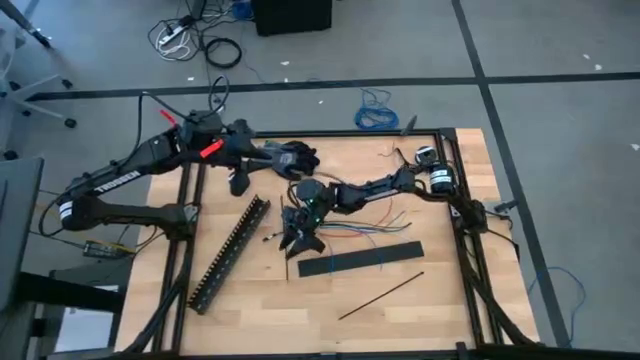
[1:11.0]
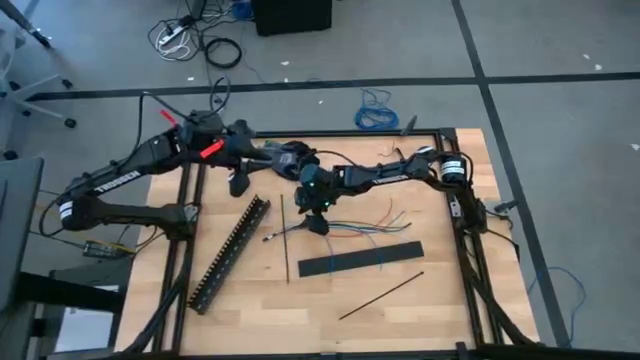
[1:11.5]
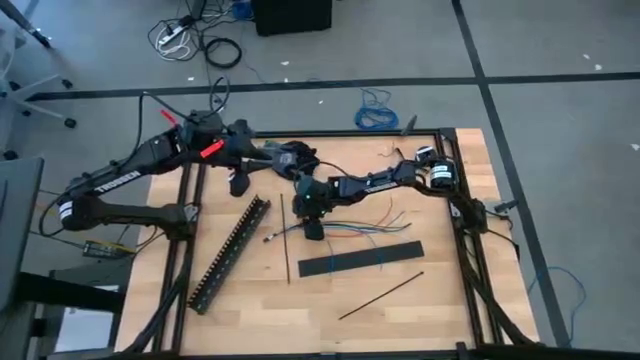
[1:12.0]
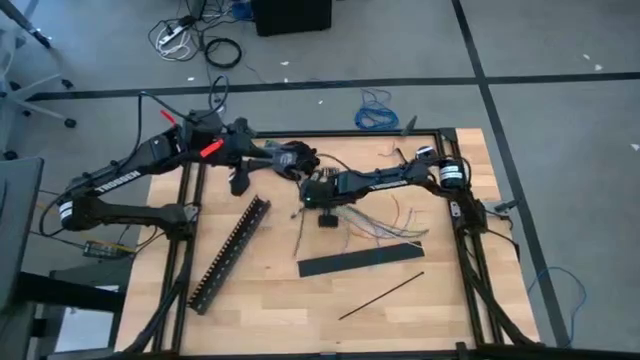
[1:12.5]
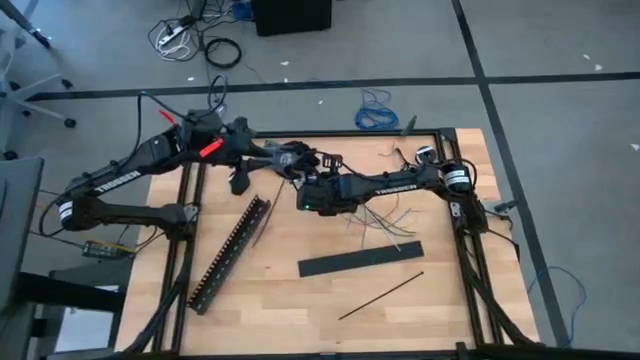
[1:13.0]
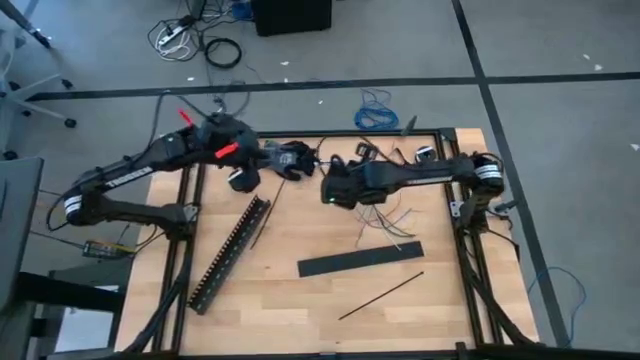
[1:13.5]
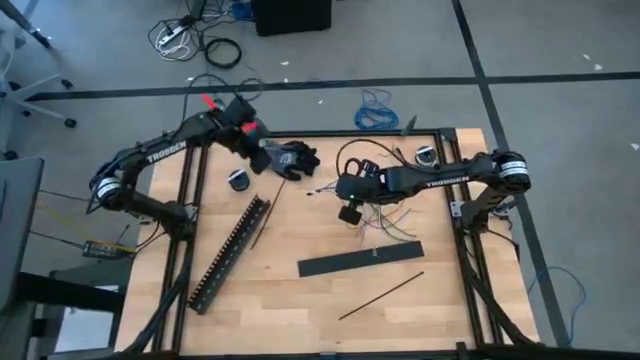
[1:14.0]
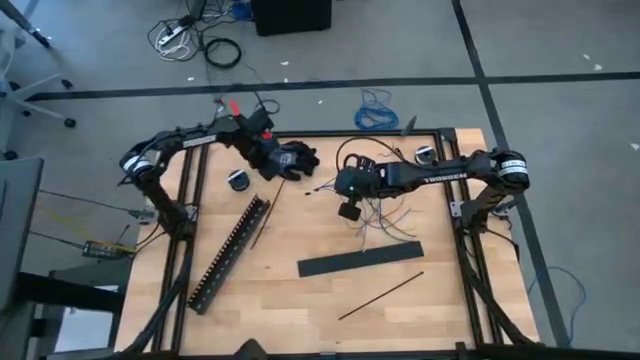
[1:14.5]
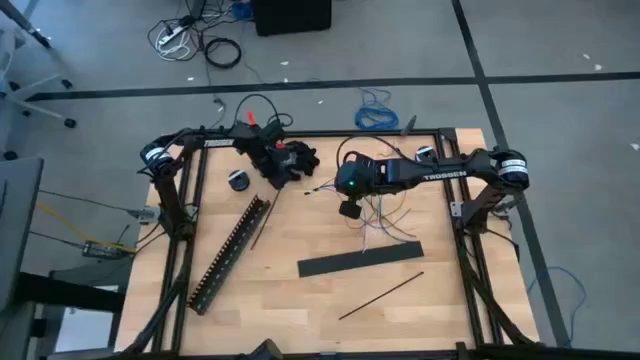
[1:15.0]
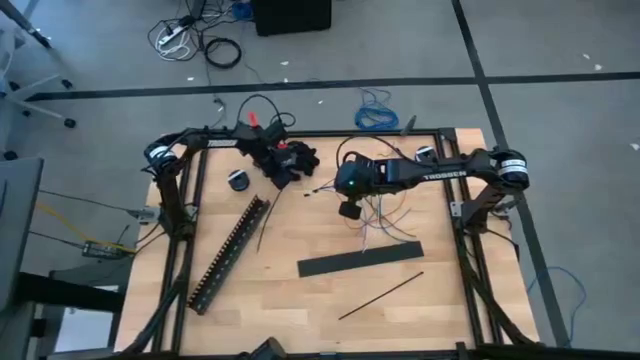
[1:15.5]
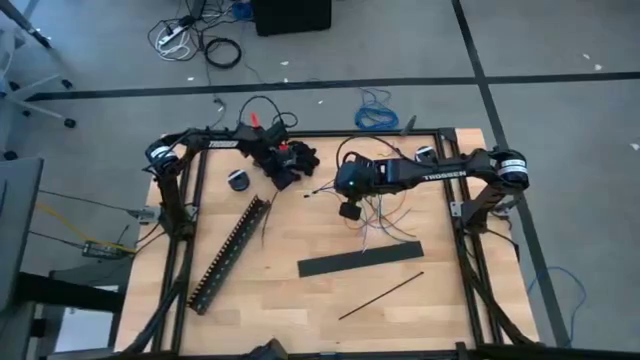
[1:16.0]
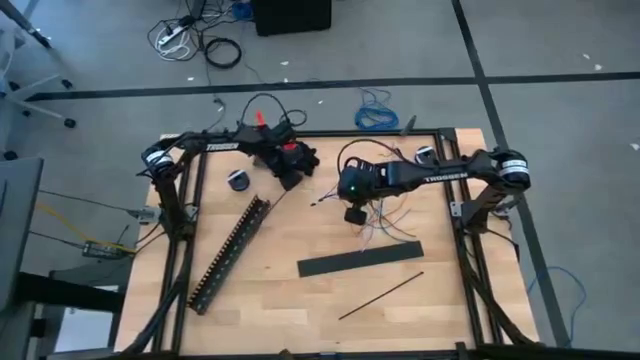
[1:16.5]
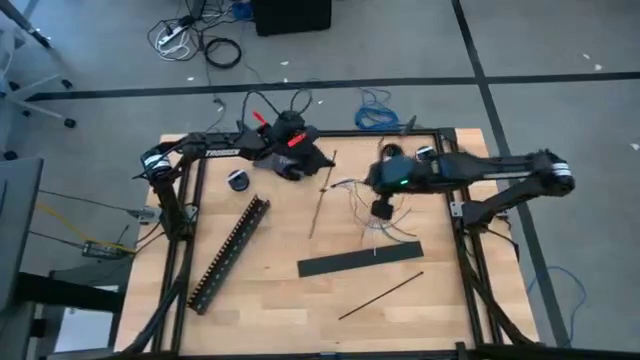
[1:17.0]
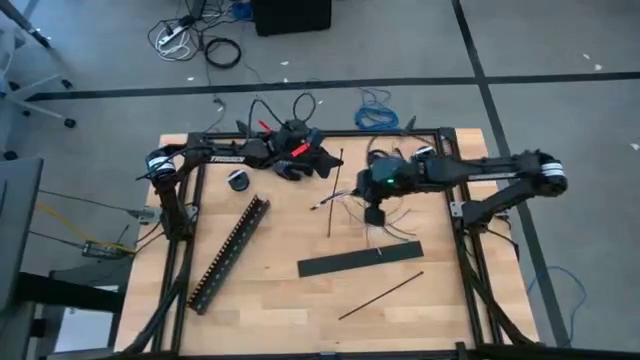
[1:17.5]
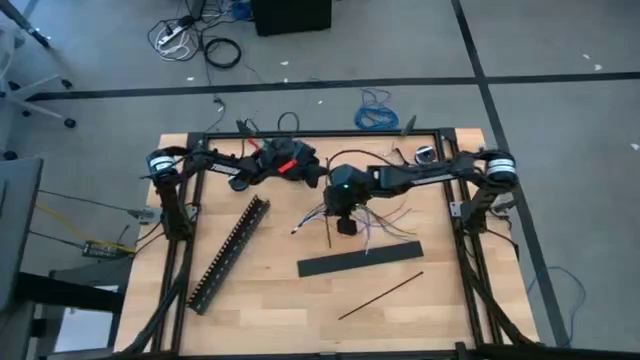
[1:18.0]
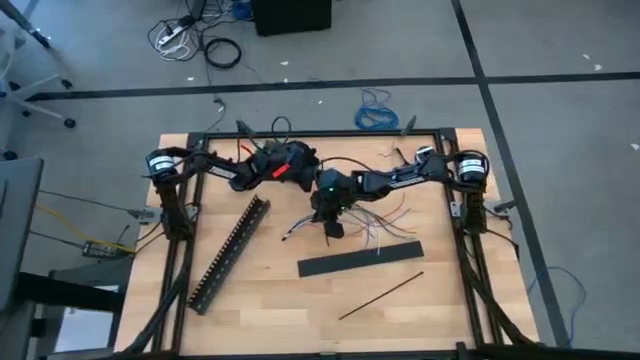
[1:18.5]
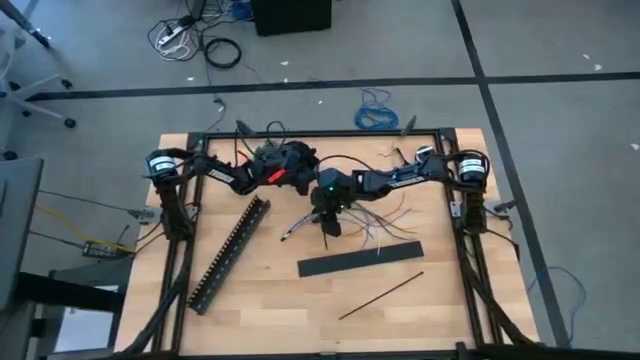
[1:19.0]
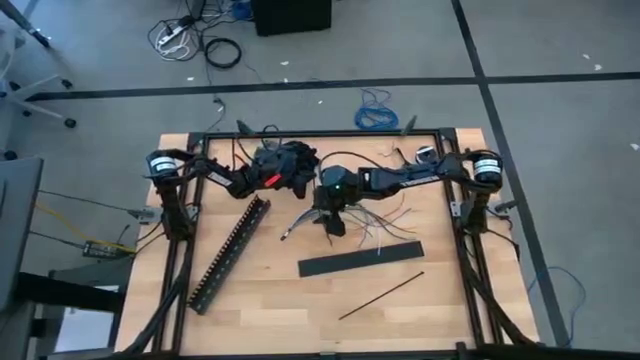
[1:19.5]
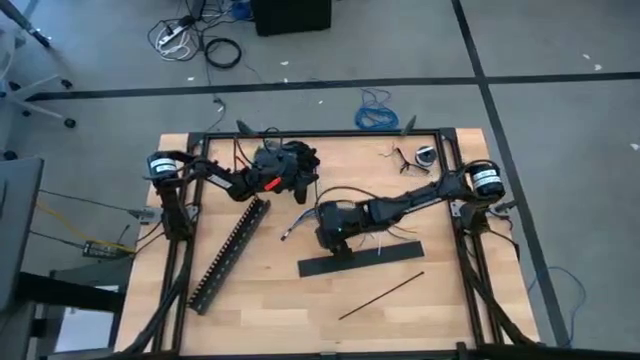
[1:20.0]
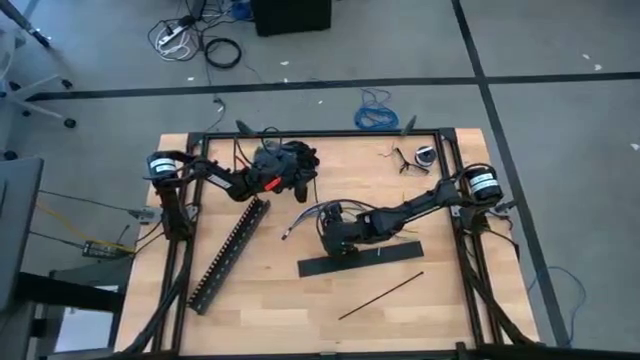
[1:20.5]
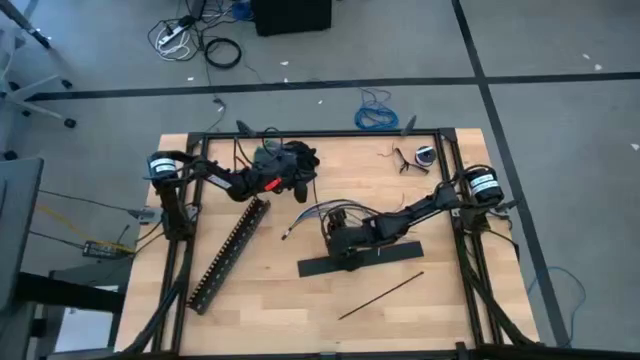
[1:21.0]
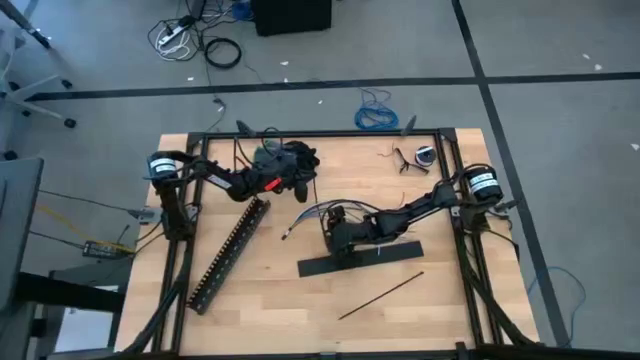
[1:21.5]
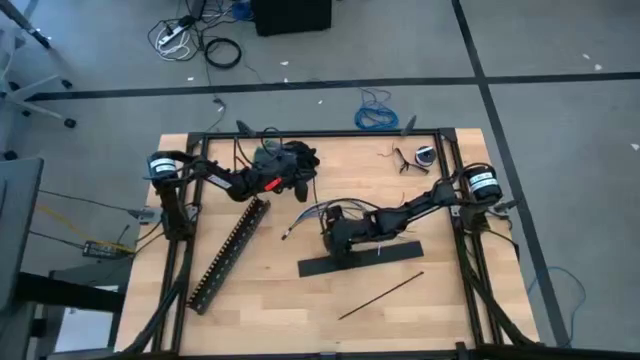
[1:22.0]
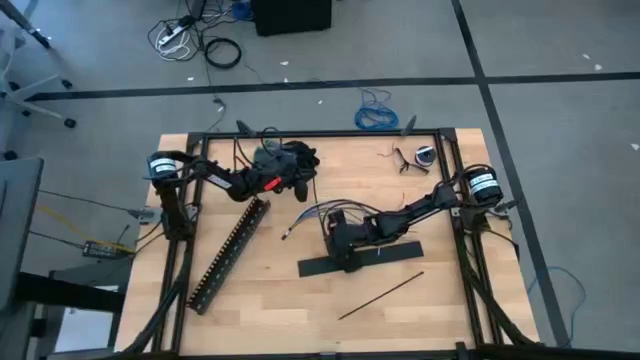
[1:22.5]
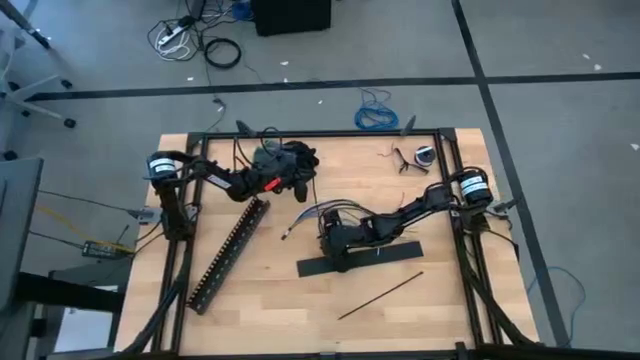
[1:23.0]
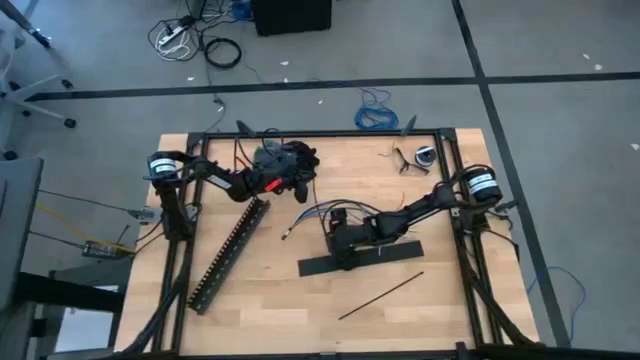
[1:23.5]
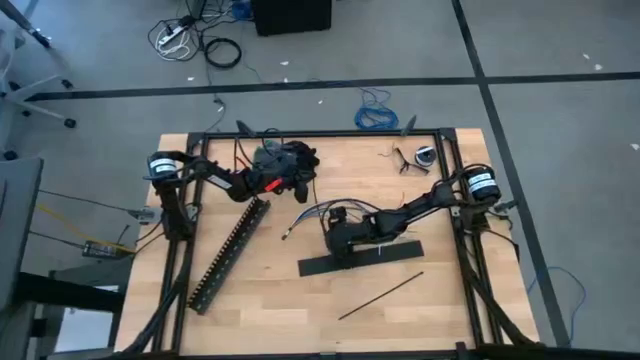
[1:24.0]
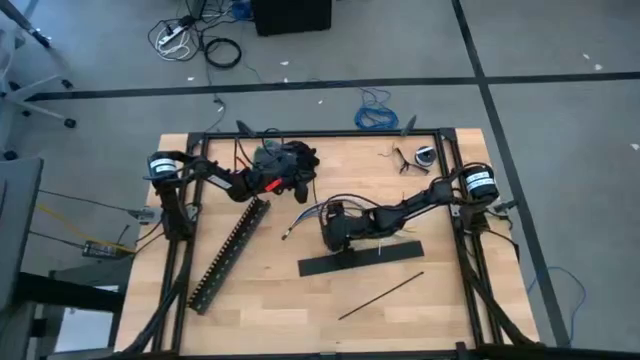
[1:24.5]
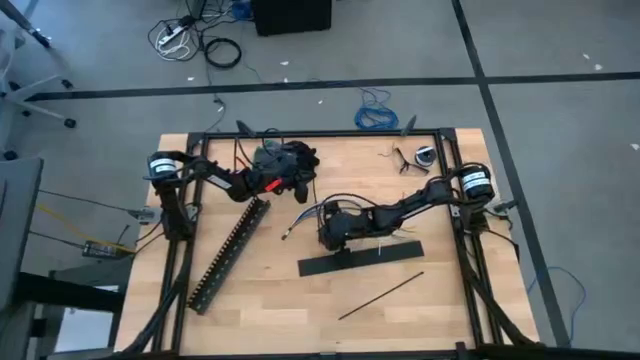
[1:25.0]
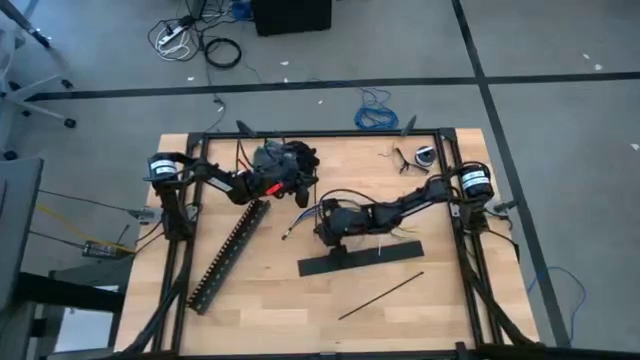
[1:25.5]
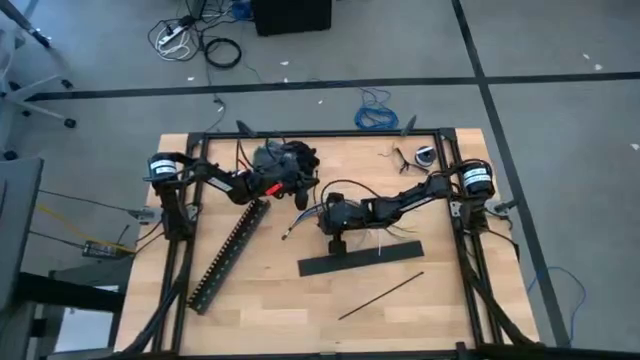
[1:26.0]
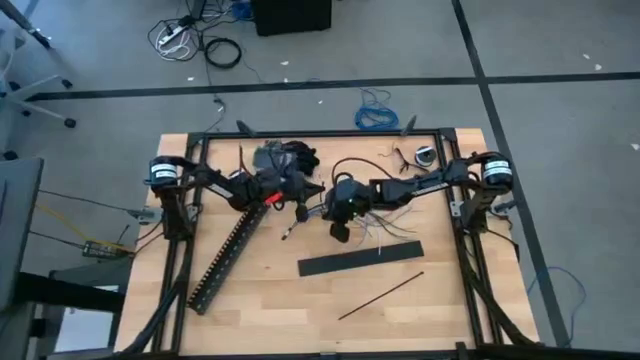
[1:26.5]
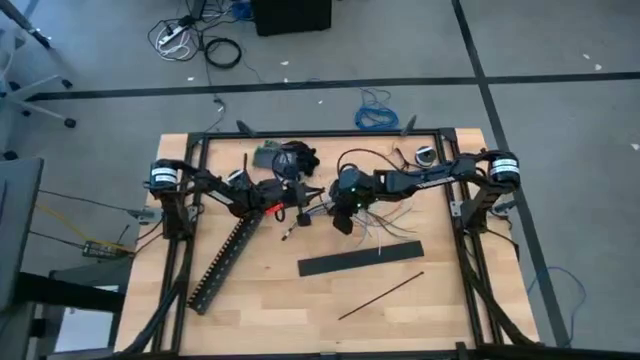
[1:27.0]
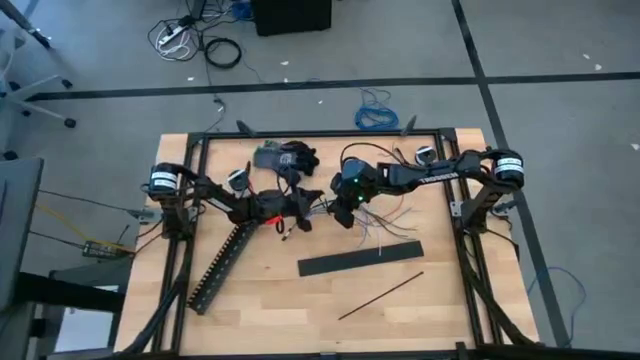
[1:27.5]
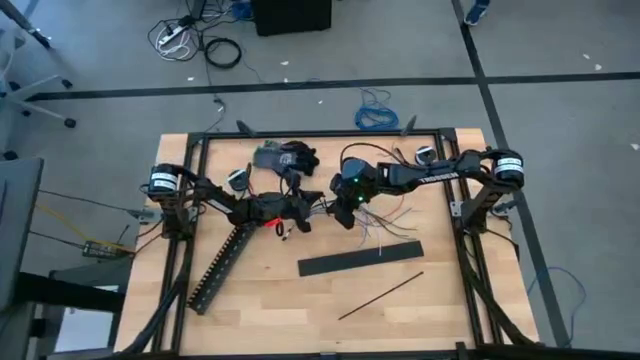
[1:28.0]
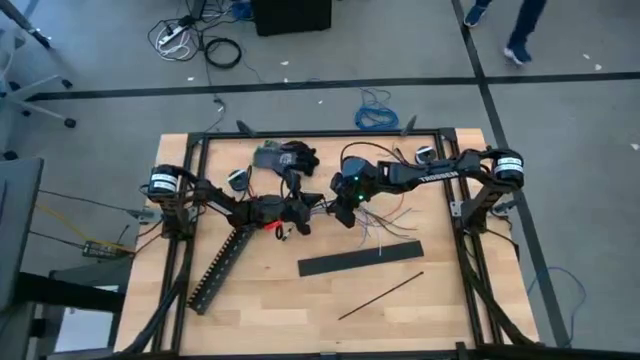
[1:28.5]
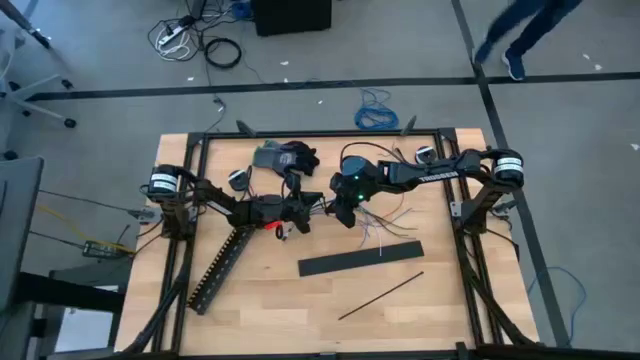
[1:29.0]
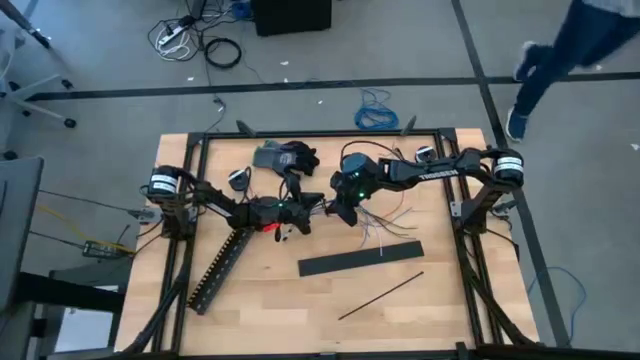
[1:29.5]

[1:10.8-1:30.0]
Task: Ziptie cables
Wrap the black zip tie on the cable wires
